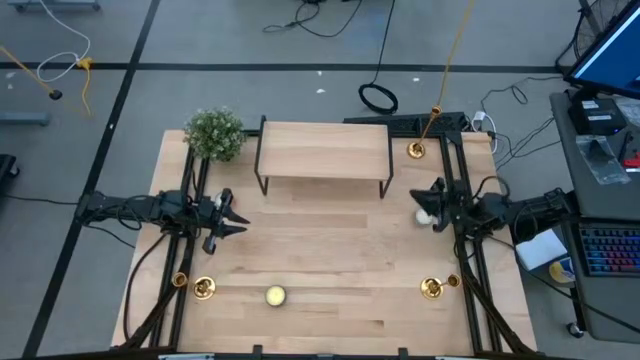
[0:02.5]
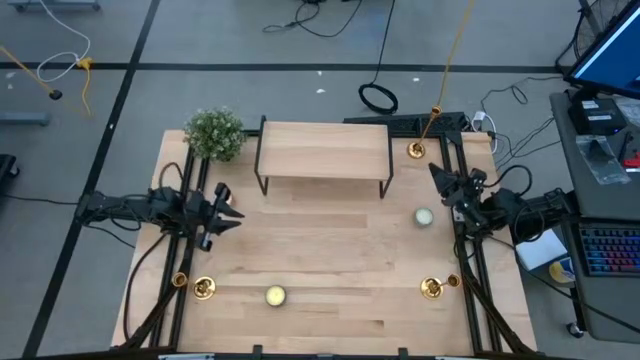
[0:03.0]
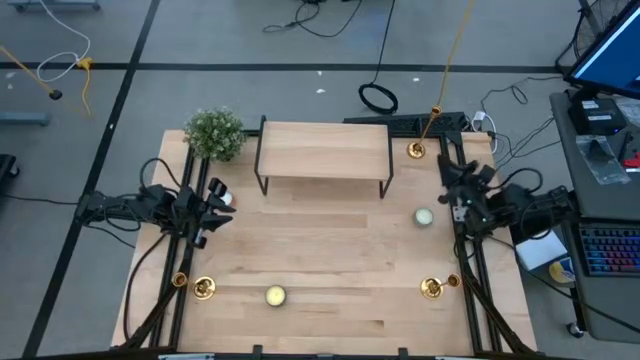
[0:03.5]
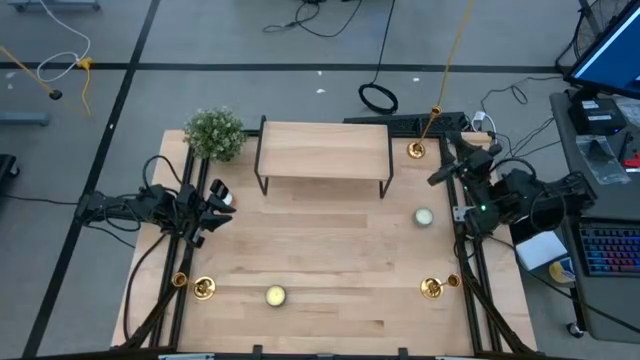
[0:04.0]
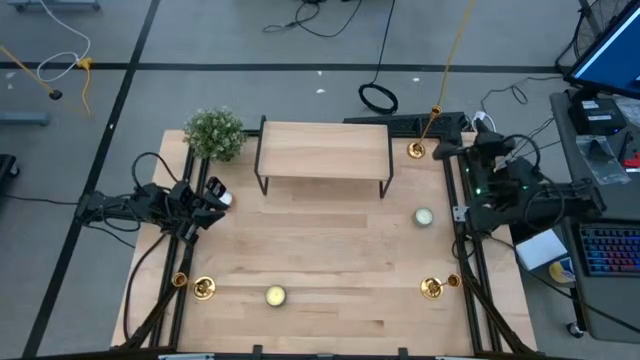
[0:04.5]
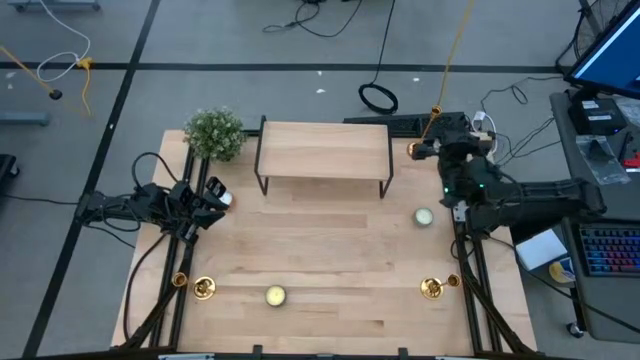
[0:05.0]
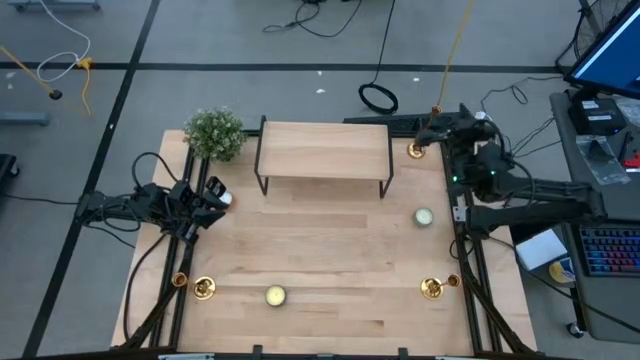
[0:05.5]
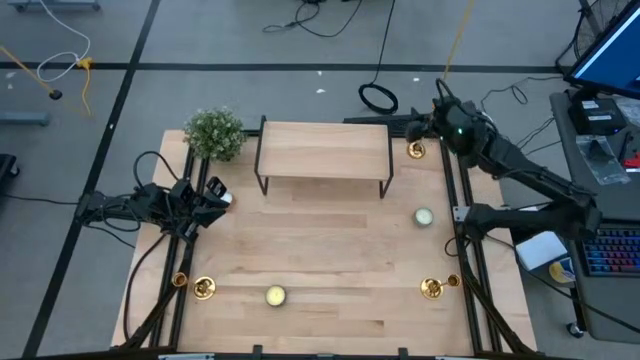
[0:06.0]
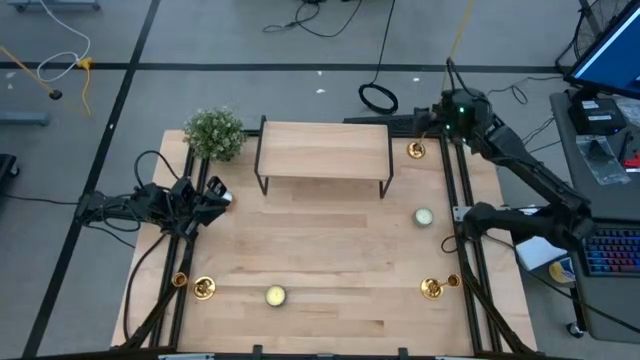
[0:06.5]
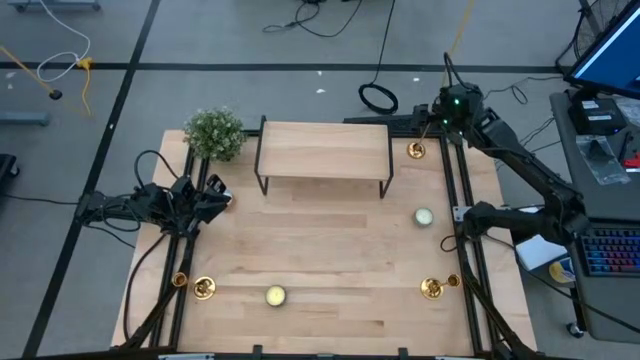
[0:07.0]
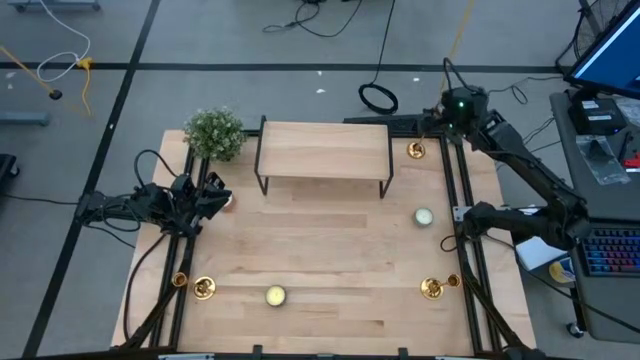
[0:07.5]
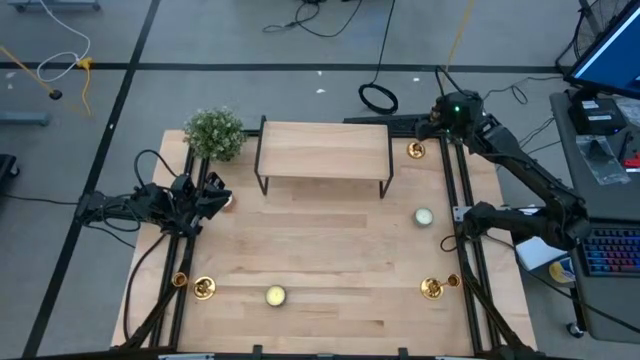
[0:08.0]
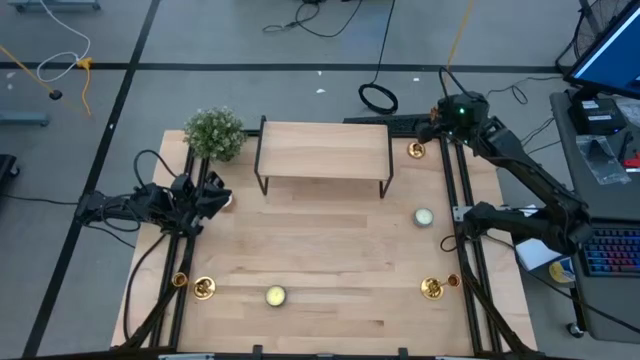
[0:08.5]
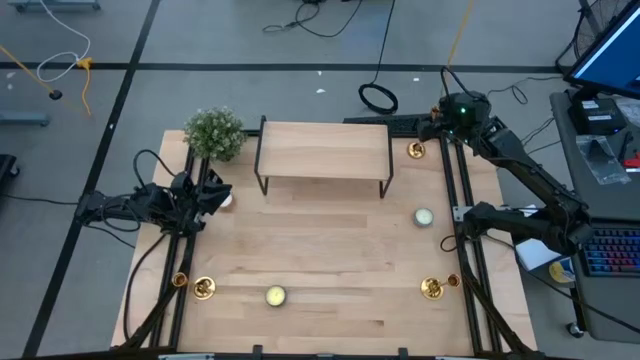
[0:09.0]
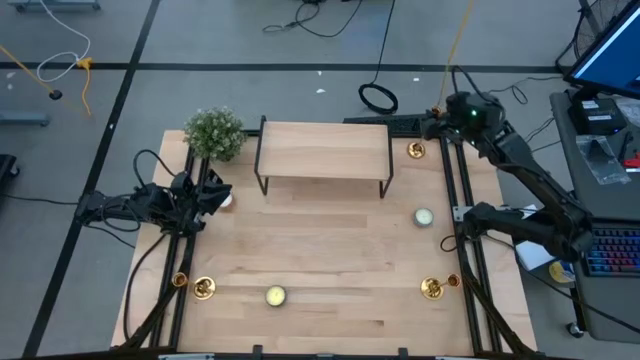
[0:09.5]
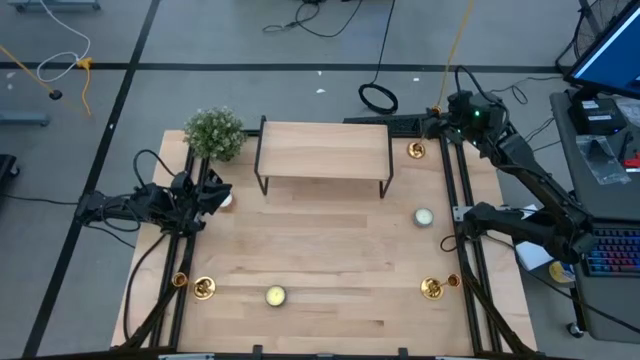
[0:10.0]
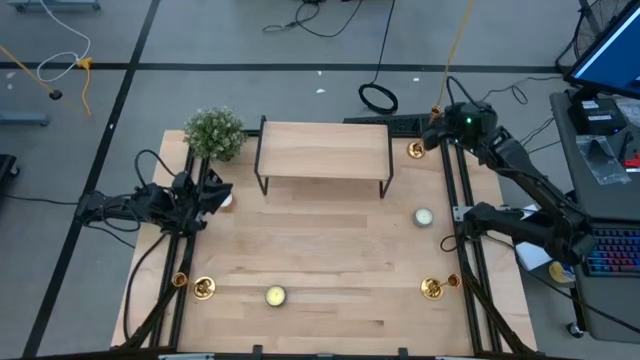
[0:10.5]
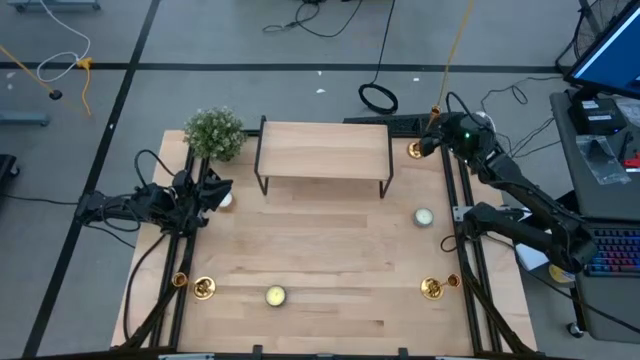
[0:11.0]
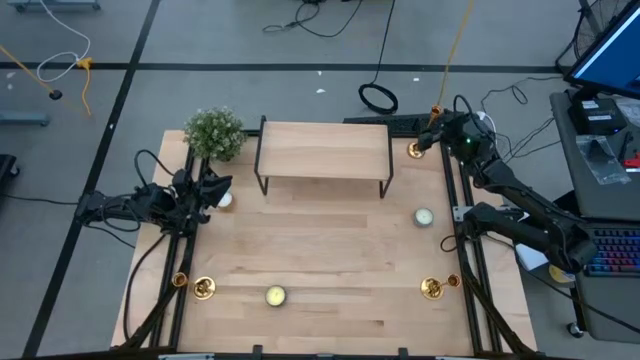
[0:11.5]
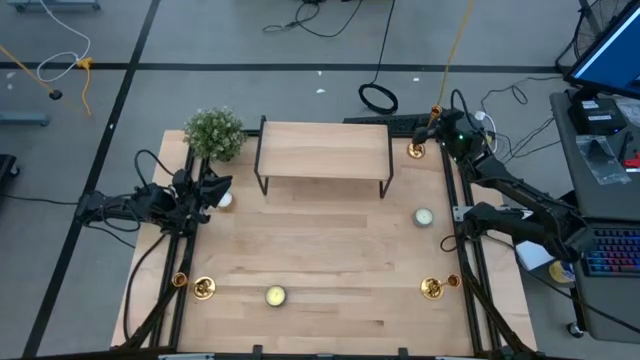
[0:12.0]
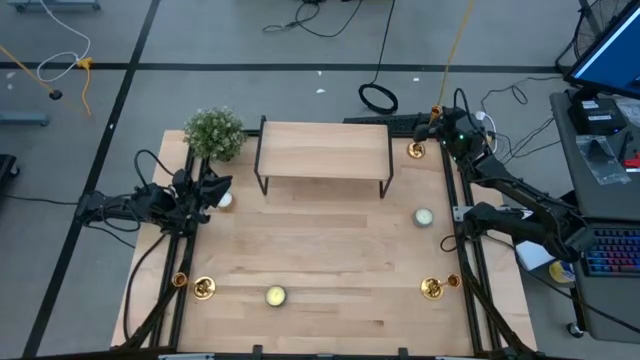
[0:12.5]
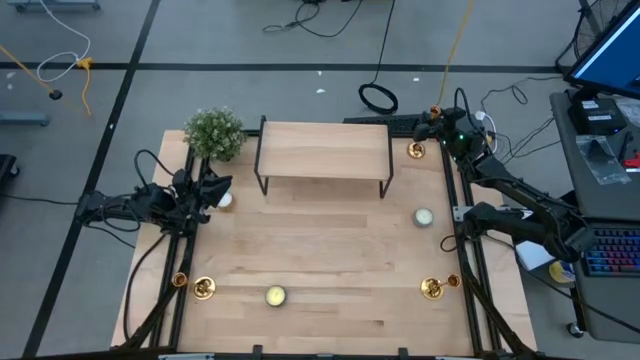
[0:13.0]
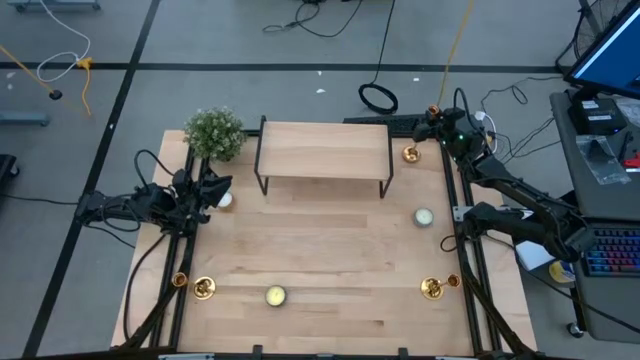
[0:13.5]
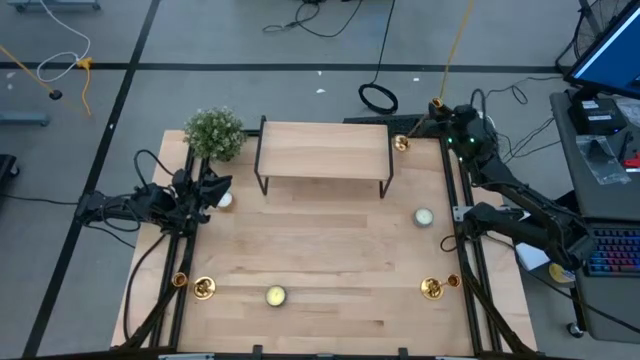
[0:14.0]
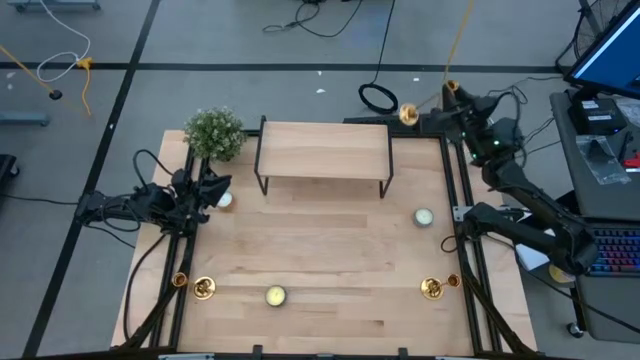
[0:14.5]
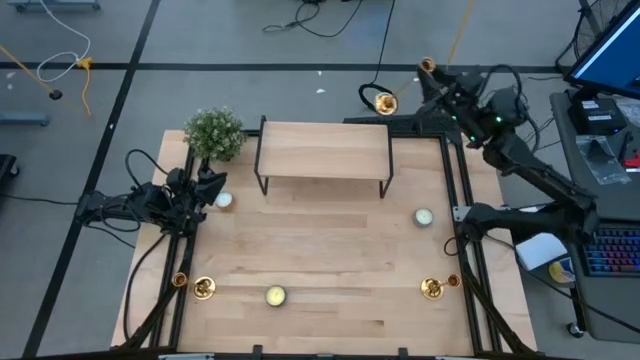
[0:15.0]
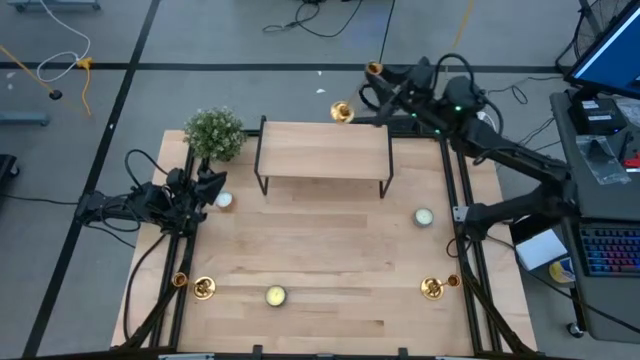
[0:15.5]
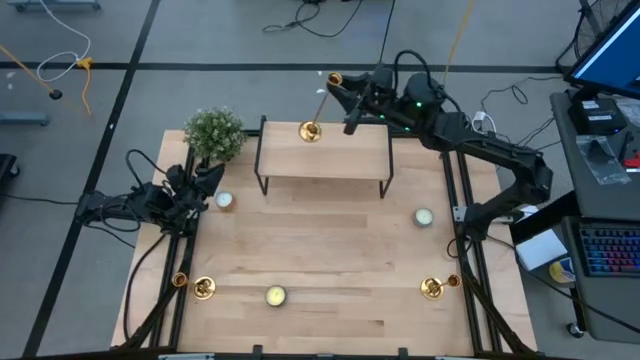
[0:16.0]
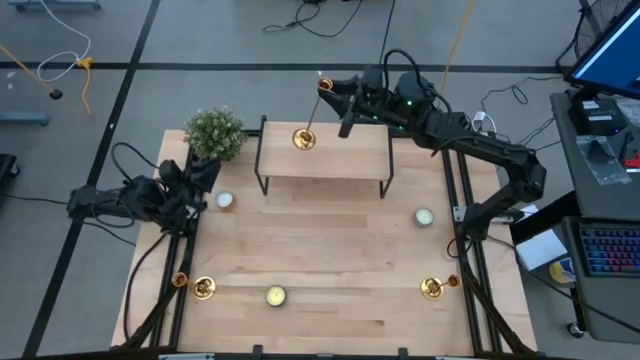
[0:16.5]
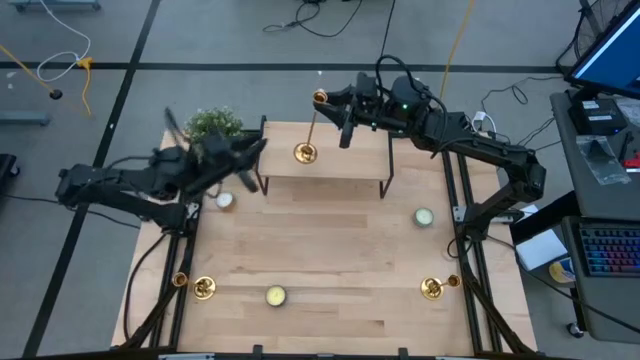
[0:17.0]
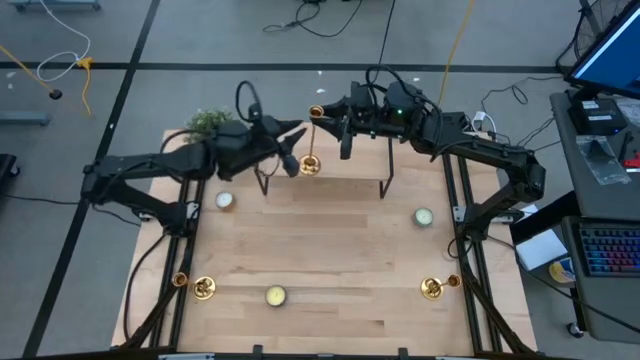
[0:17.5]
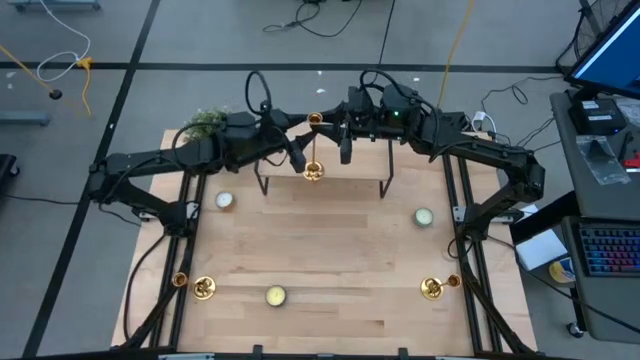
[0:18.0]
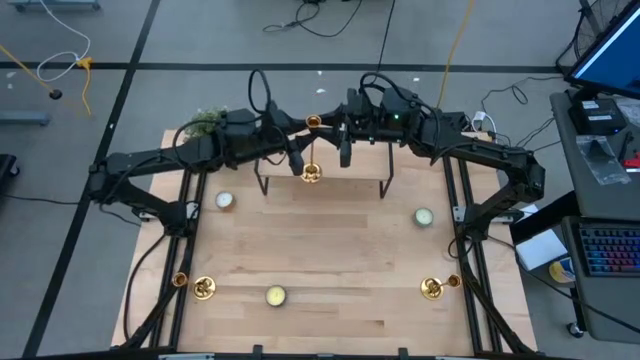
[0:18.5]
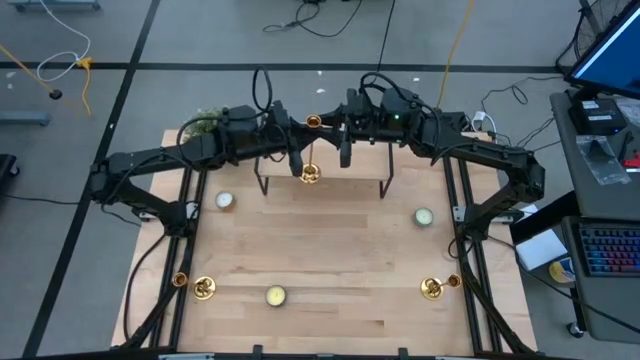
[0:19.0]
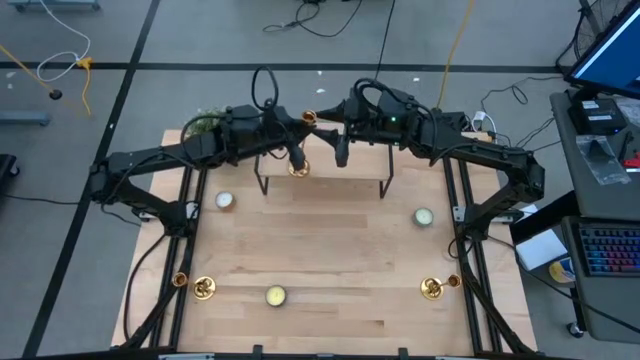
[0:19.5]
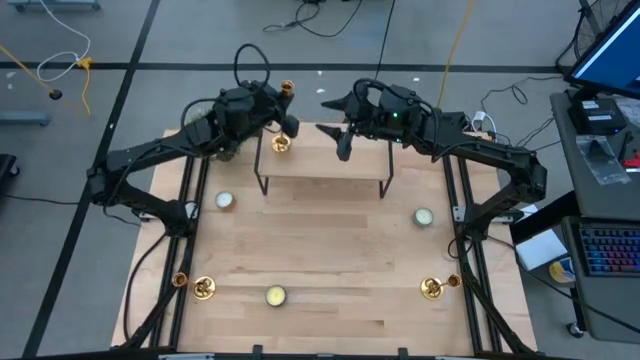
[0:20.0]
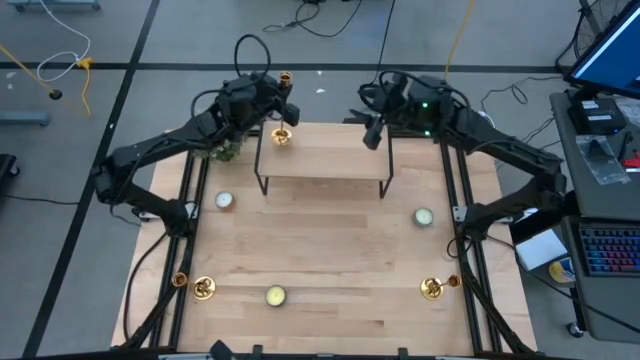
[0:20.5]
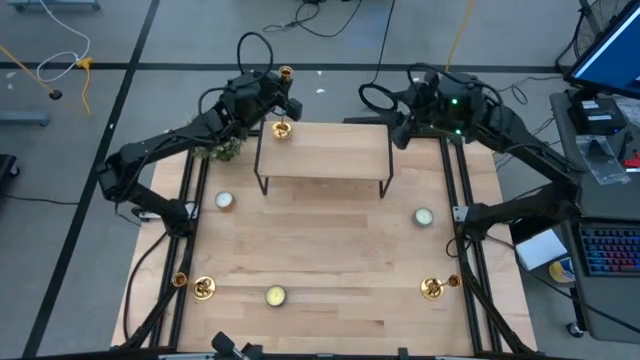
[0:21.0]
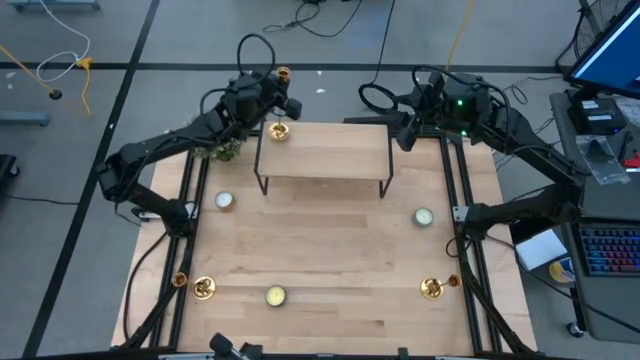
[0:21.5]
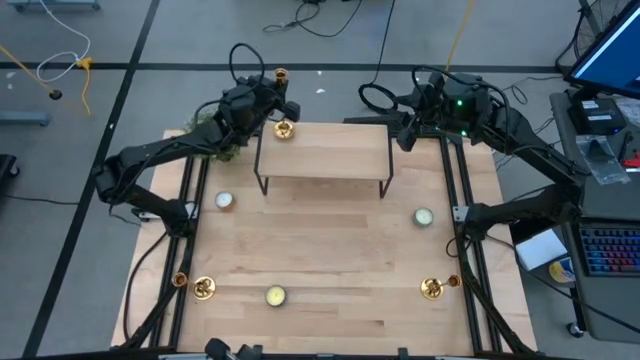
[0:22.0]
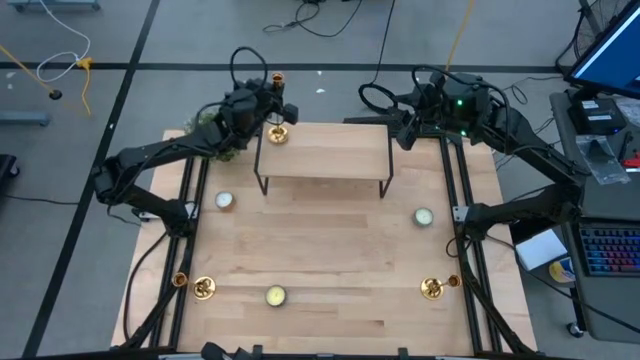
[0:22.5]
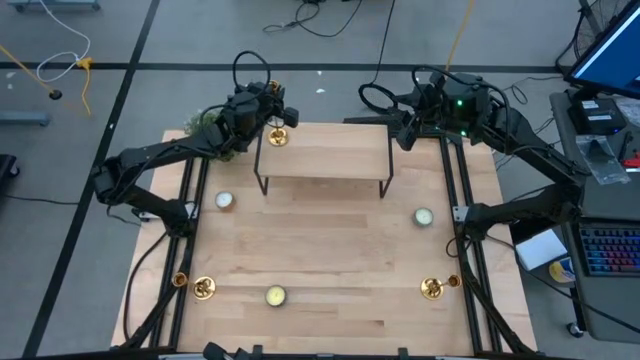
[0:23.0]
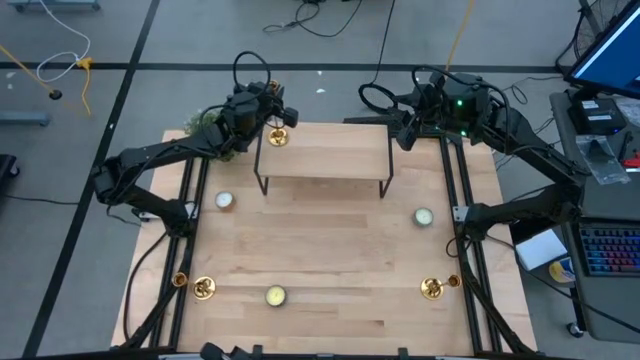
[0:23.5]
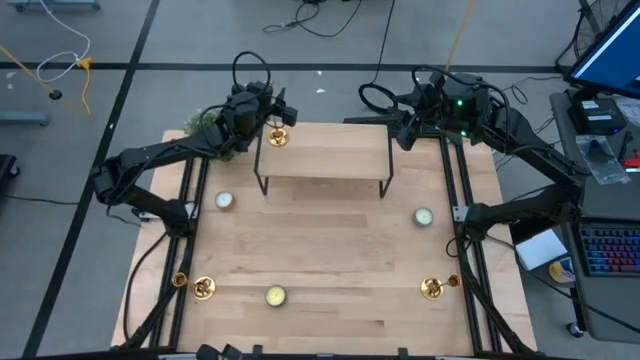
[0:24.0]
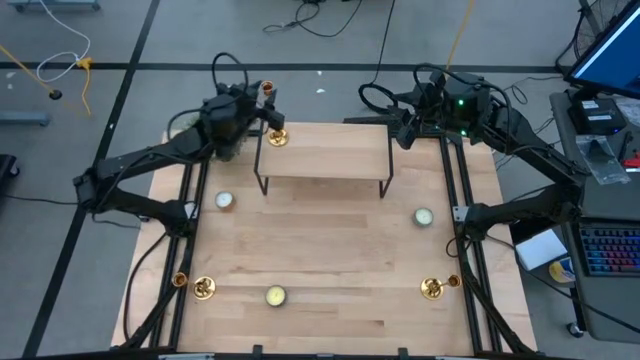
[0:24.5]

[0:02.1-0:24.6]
Task: Pick & Place candle stick holders
Put the top gold candle holder on the shelf
